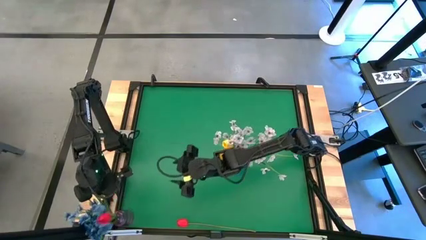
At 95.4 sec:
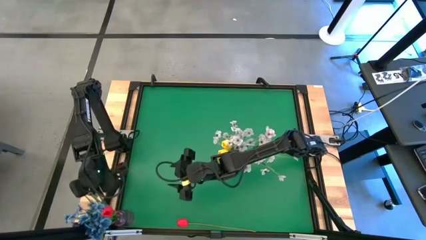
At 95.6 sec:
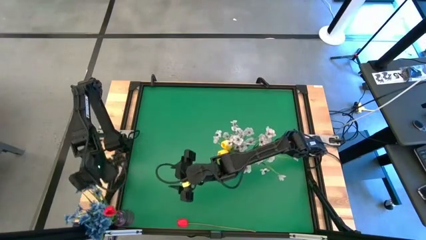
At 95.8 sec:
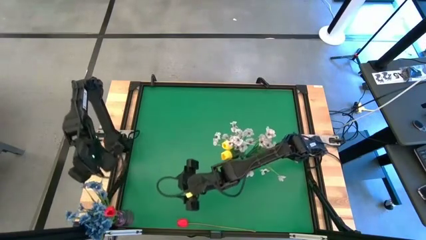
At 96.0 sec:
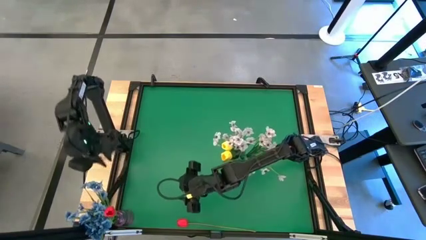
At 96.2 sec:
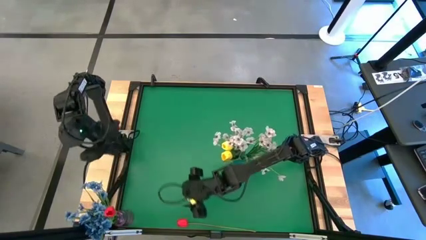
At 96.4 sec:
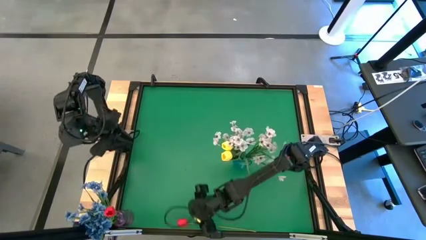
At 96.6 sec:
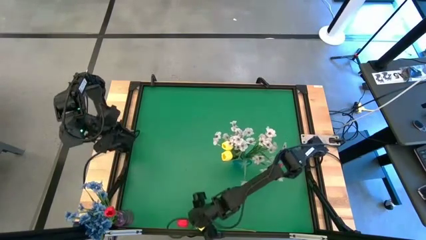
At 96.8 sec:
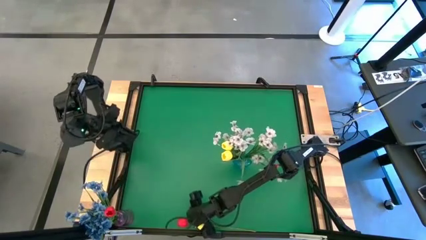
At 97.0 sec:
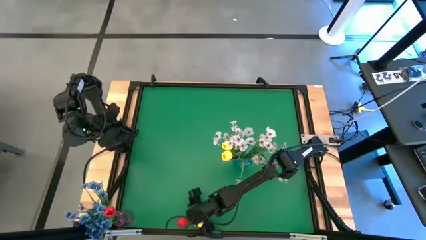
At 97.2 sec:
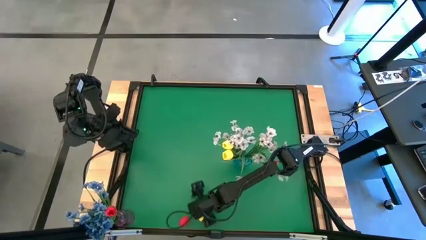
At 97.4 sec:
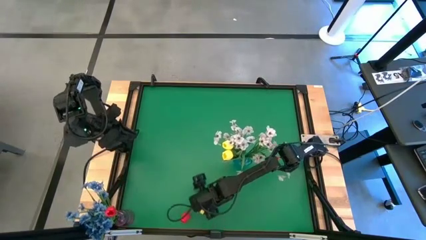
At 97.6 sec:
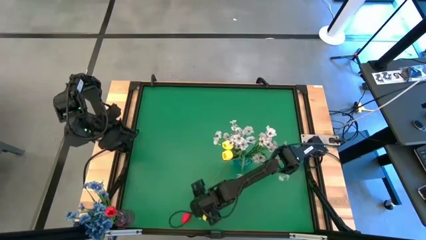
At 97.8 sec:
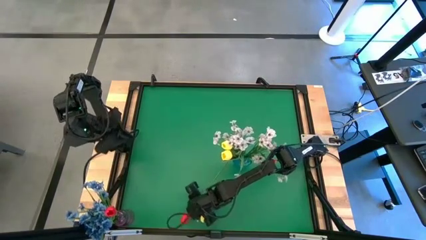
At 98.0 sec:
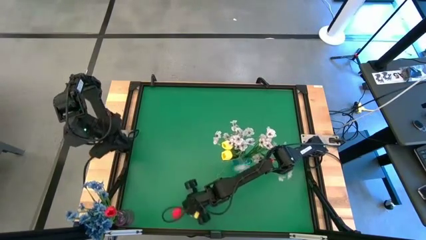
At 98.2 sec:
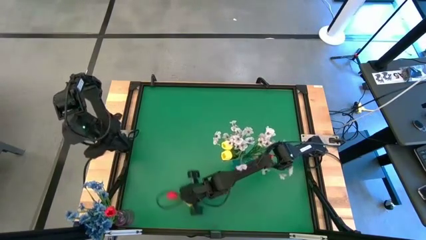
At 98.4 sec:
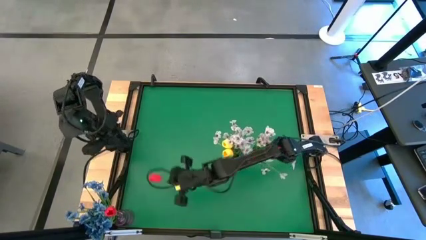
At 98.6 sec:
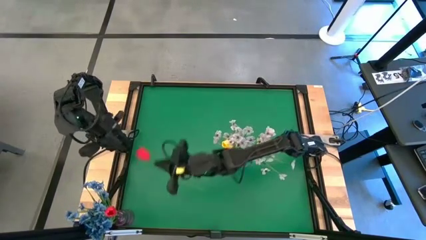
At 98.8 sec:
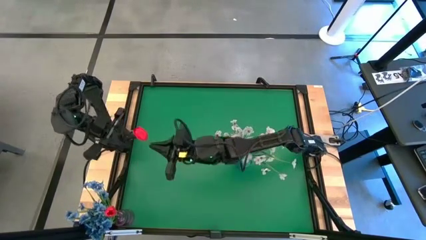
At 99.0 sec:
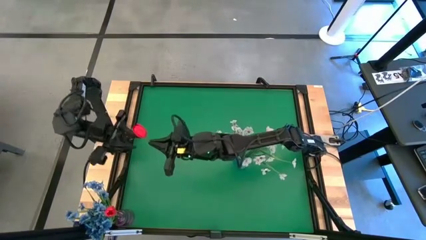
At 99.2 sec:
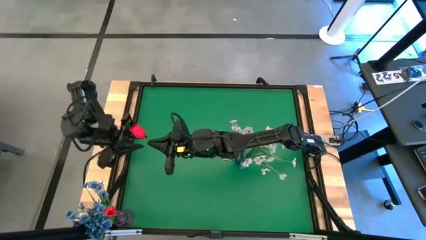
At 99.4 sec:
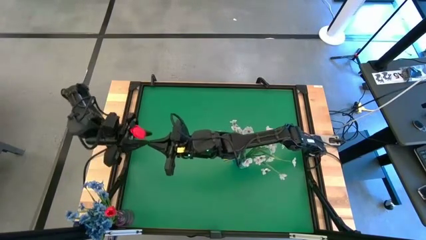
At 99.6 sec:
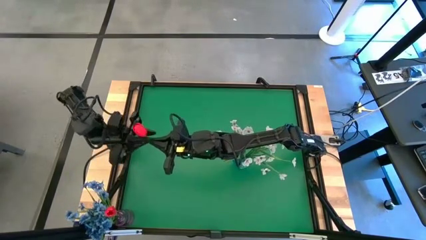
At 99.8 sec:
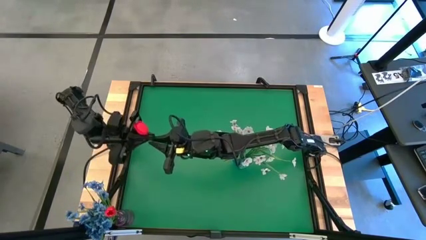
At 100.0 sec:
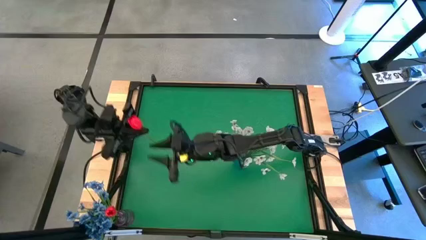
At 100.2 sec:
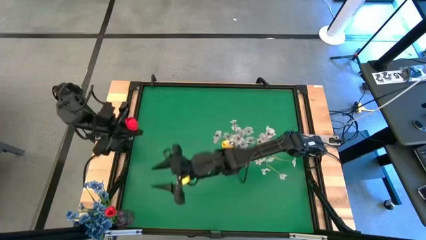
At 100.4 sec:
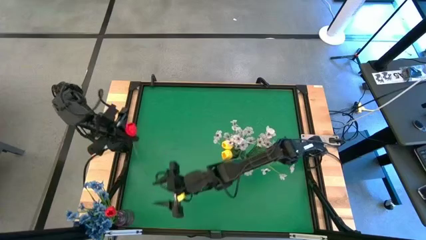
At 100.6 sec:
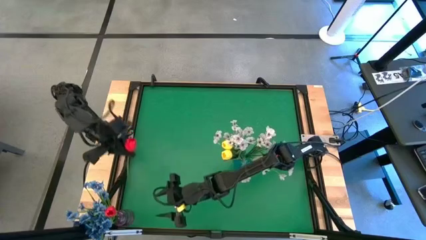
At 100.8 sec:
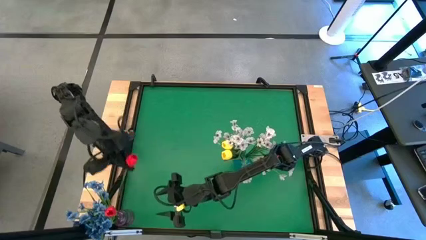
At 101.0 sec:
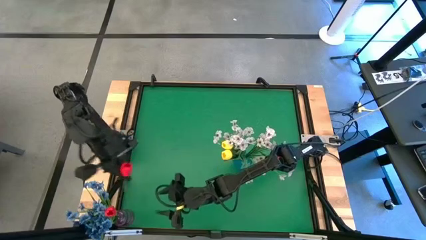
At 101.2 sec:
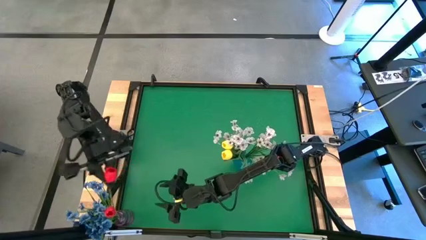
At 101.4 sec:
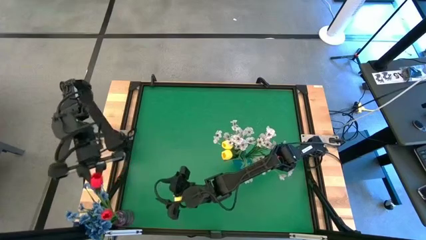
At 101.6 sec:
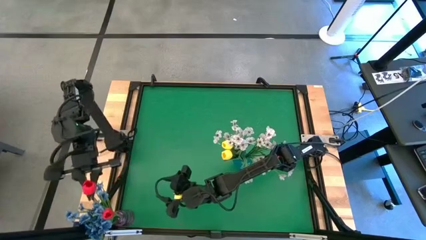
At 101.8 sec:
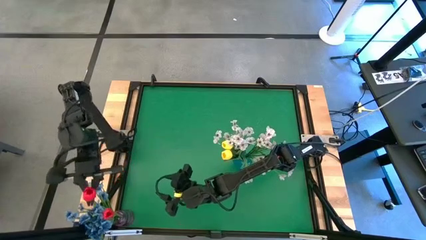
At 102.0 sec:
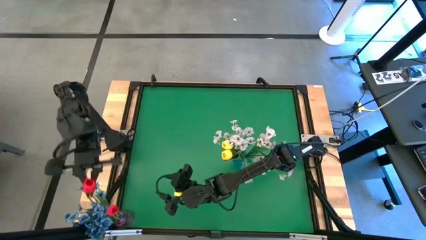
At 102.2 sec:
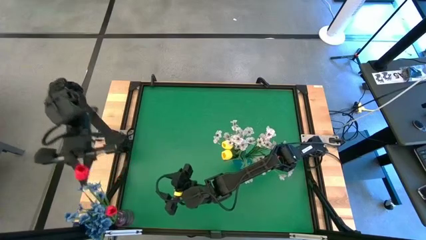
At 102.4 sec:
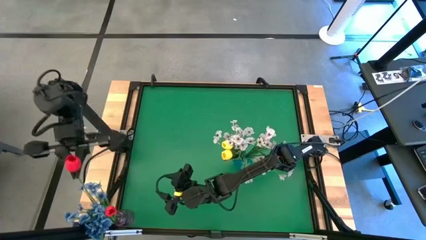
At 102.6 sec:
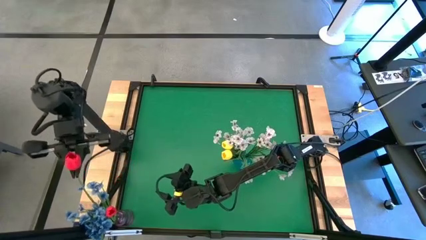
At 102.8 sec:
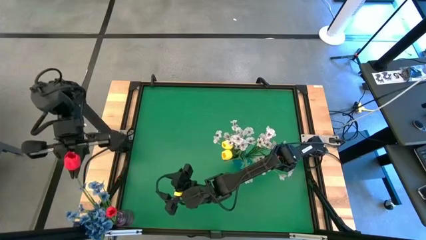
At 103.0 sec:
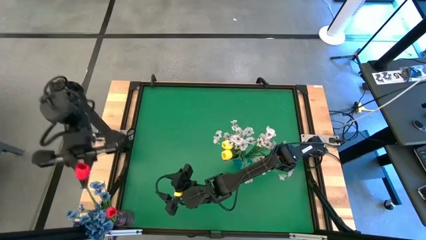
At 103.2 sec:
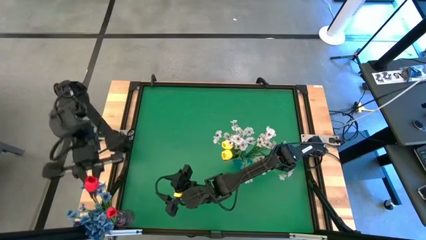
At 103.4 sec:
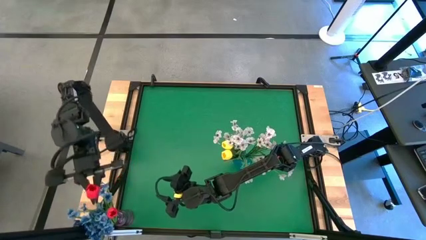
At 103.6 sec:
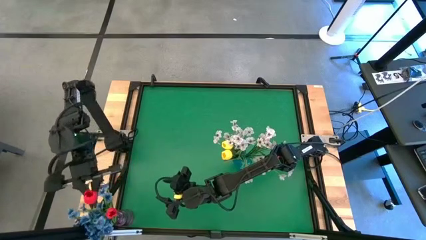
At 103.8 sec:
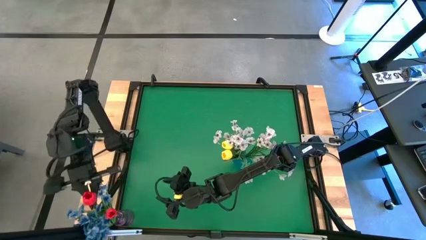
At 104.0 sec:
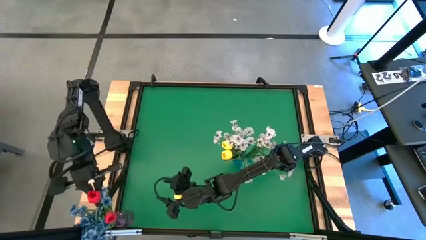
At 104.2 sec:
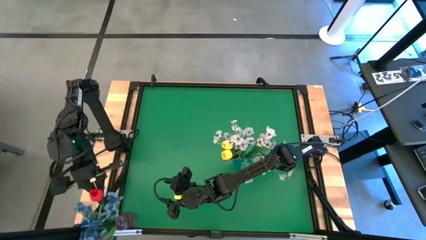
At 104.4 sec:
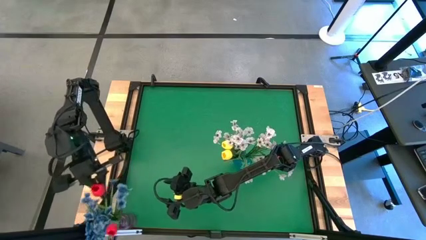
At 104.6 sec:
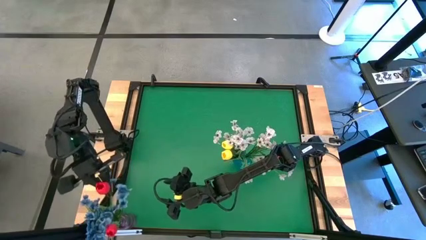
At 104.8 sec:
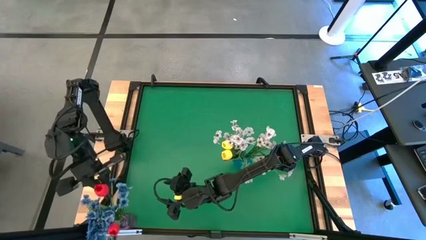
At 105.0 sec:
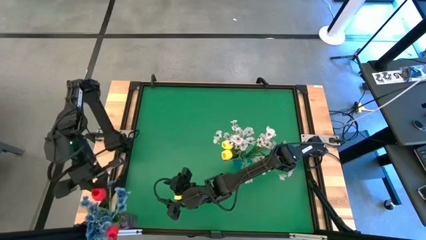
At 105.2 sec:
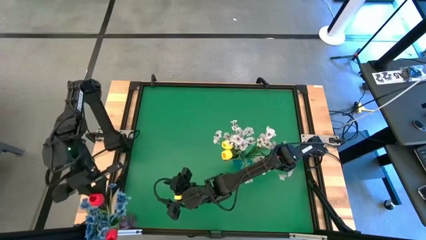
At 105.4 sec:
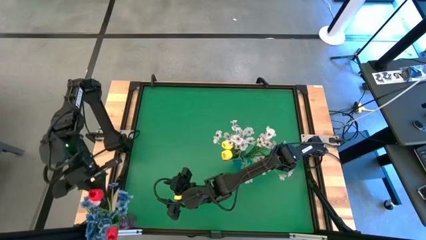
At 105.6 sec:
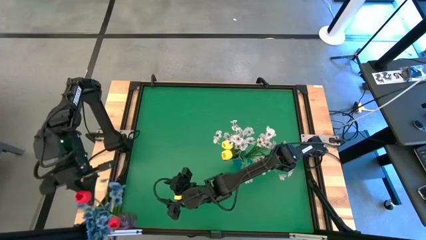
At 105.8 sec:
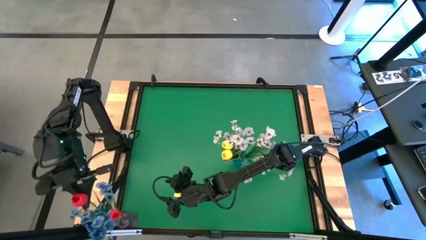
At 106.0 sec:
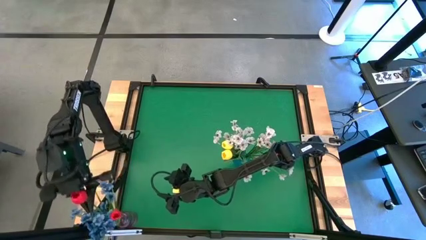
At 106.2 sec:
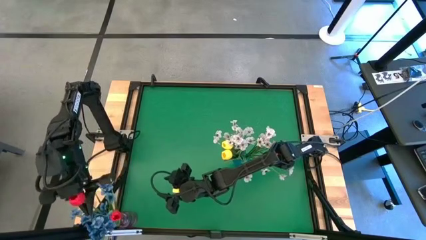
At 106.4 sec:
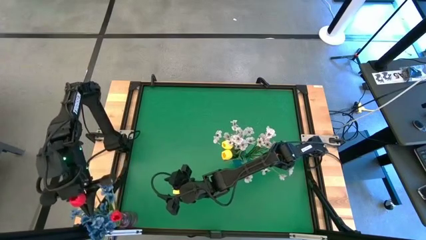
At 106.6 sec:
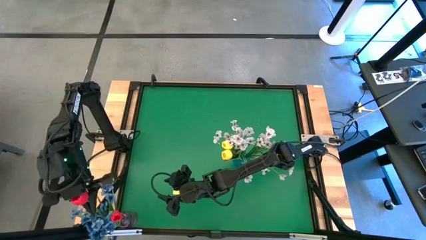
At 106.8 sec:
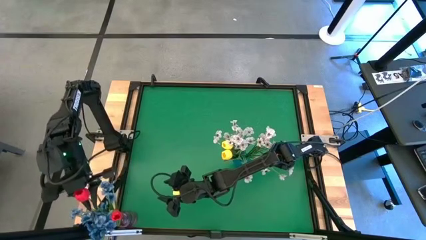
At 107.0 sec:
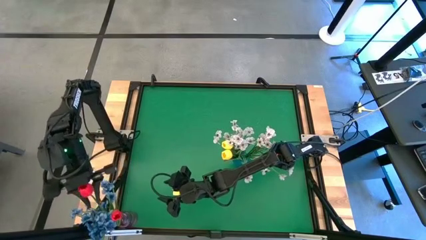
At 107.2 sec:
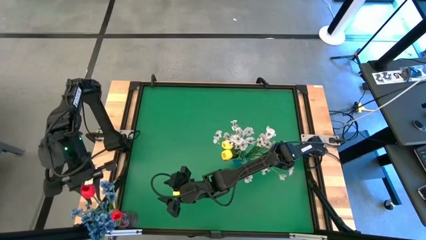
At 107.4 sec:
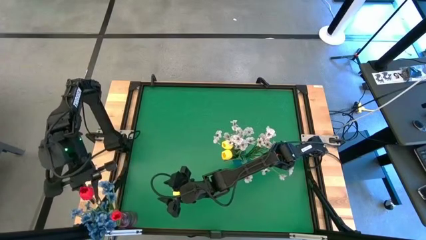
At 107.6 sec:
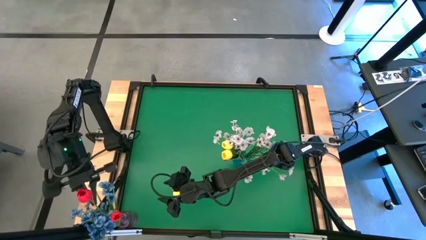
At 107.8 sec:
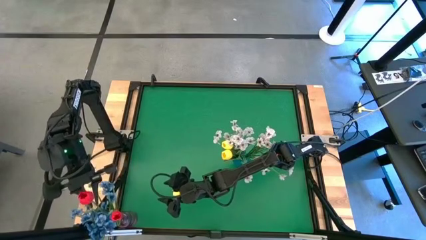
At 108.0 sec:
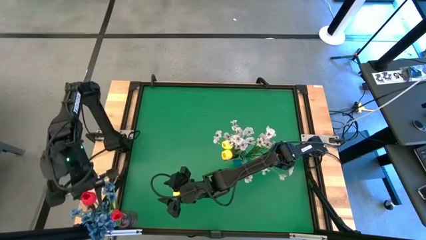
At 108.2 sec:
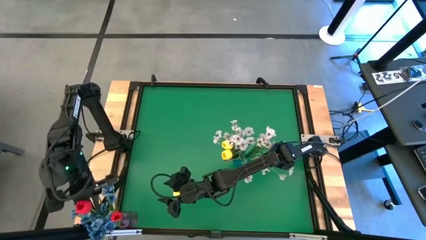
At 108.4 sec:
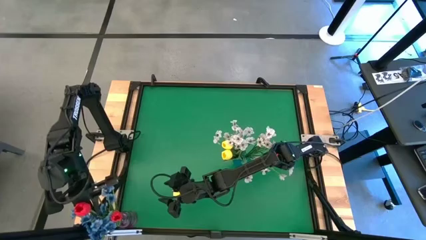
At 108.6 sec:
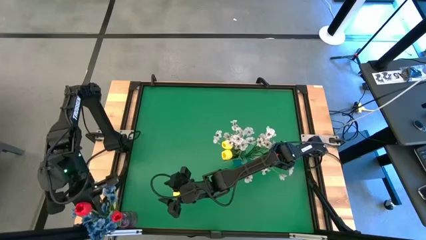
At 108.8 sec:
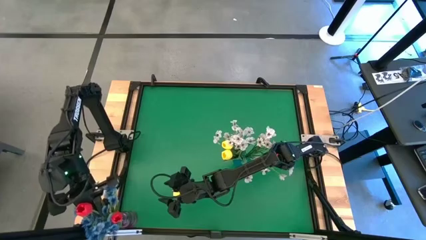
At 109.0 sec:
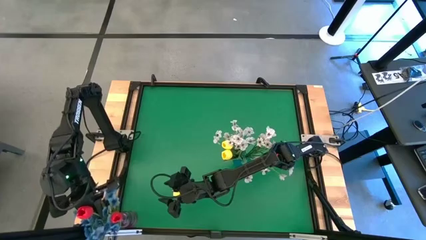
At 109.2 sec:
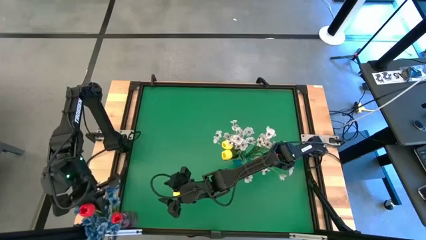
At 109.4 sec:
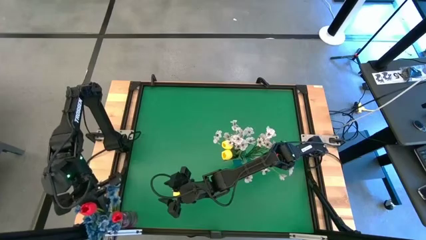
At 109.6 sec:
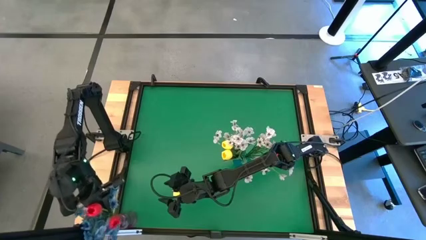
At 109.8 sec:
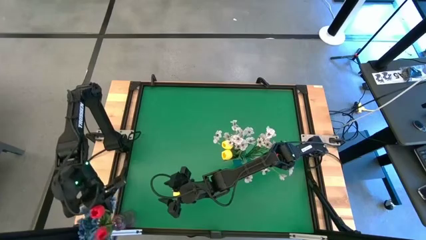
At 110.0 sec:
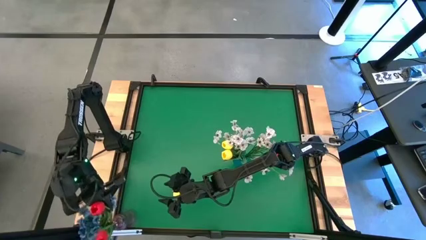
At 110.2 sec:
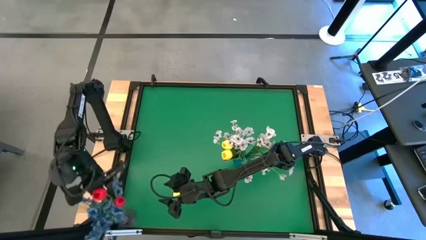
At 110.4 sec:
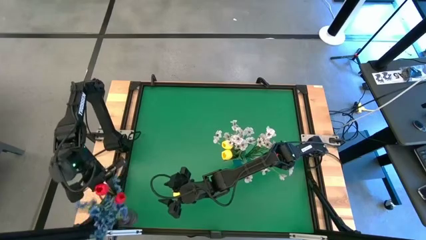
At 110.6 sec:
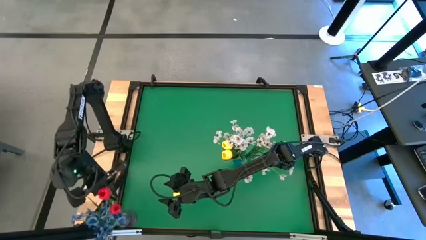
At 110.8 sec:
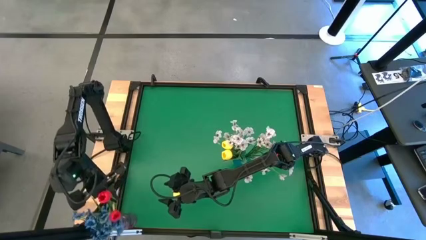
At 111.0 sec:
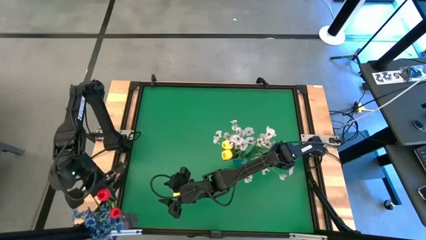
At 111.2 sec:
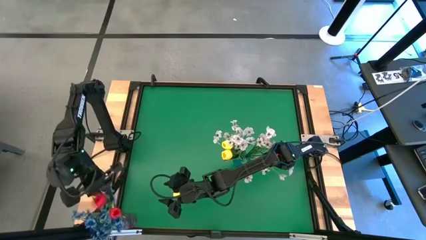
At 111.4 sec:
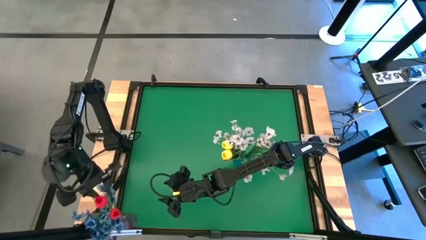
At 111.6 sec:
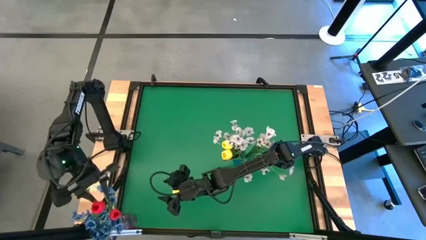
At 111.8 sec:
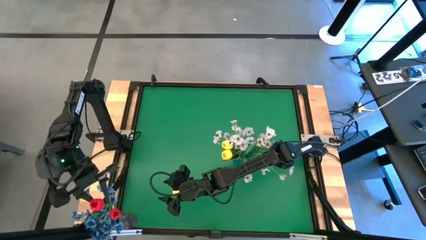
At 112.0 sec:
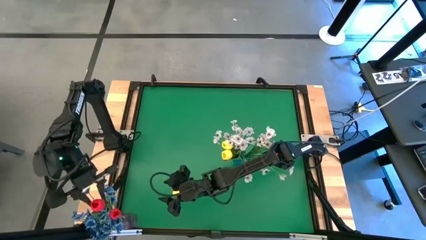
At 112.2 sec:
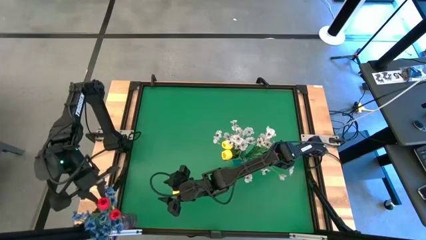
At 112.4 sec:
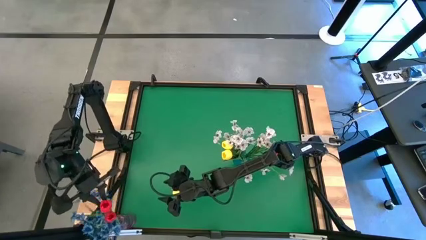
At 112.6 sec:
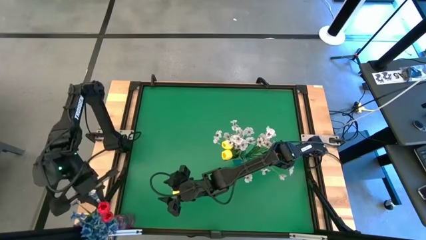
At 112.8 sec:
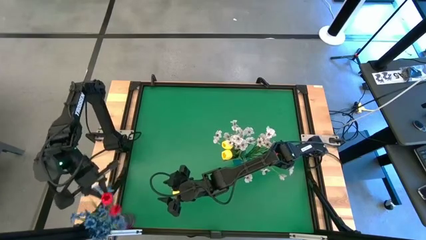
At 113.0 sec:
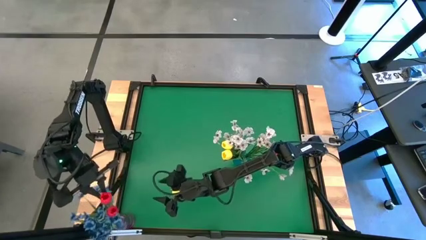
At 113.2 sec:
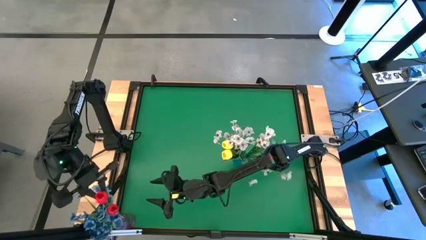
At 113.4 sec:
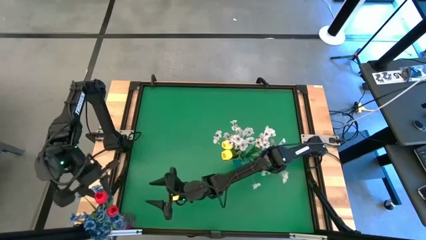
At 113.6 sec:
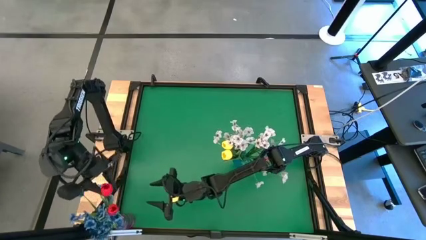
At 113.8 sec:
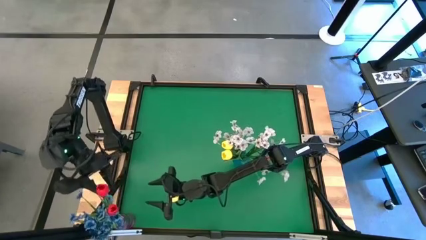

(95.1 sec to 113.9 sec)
Task: Sort flowers into vase by color
Put the red tulip into violet the vase
